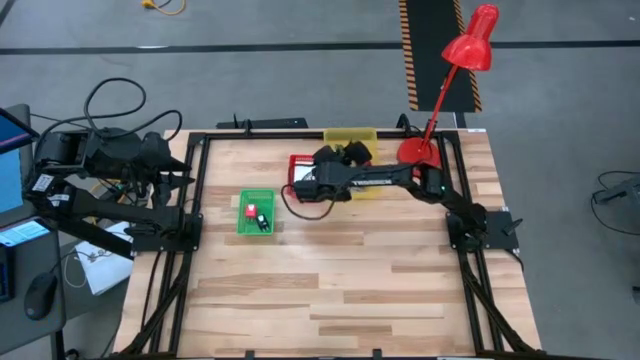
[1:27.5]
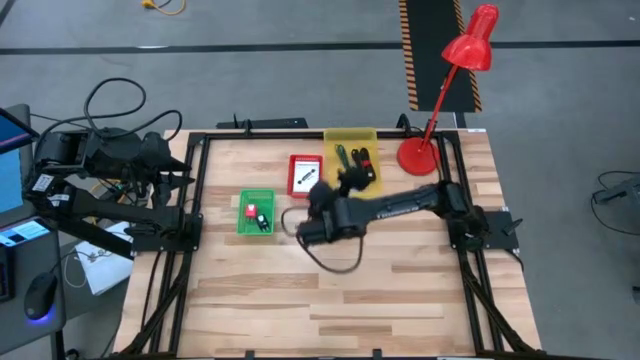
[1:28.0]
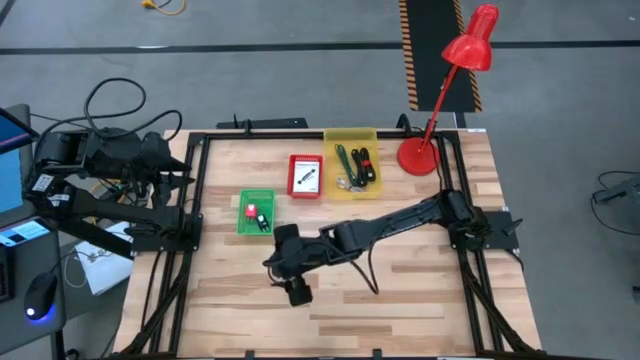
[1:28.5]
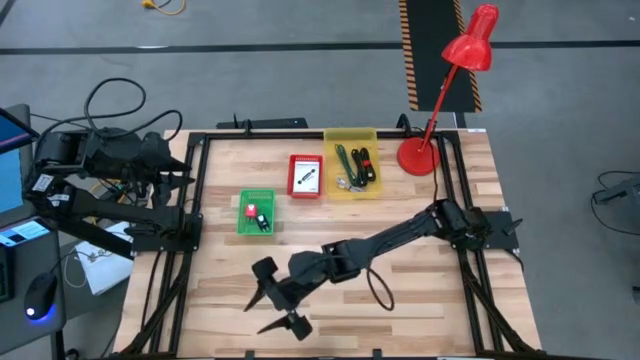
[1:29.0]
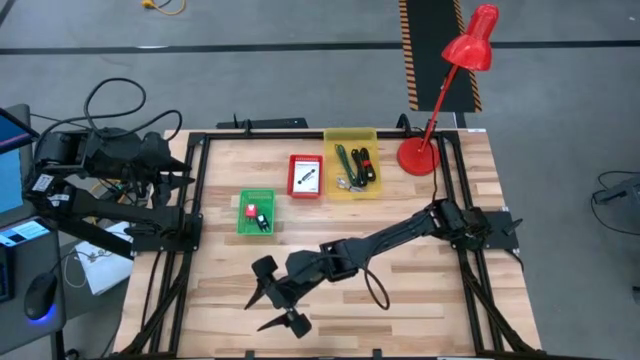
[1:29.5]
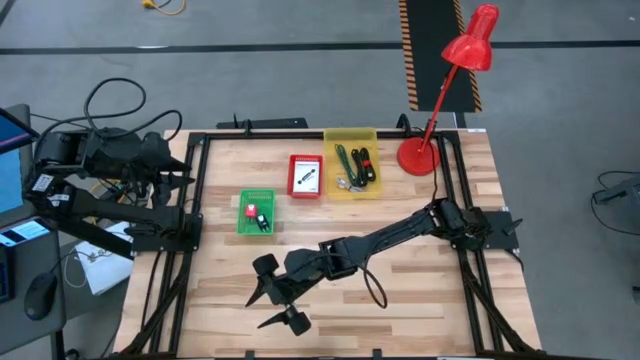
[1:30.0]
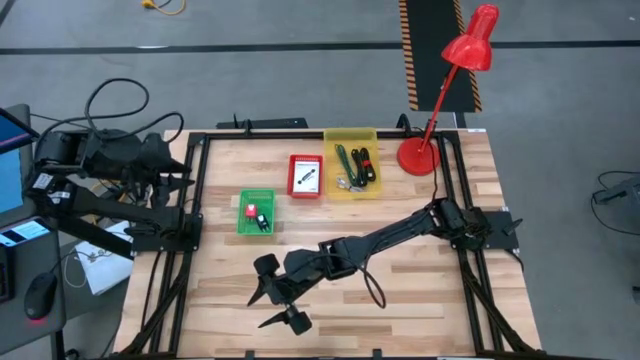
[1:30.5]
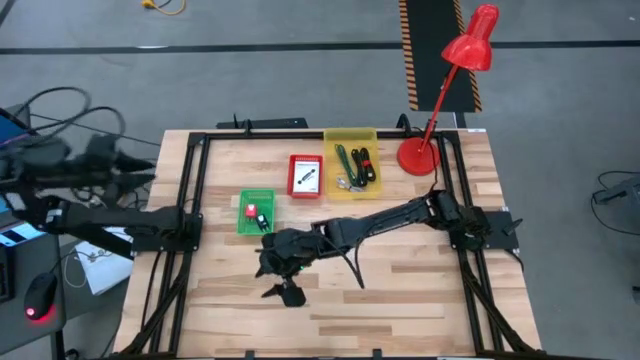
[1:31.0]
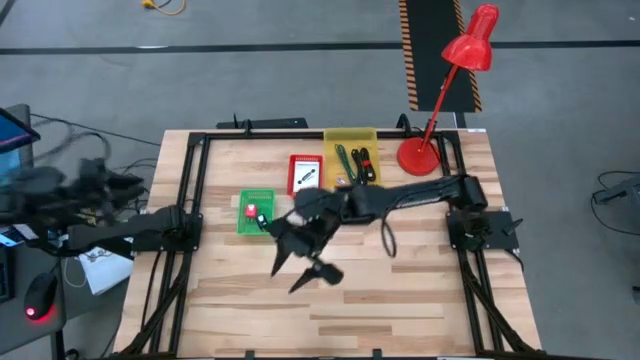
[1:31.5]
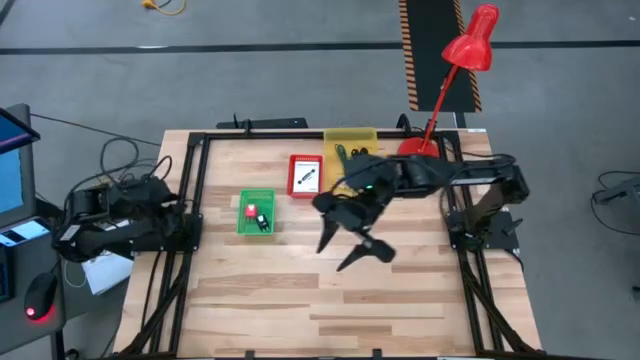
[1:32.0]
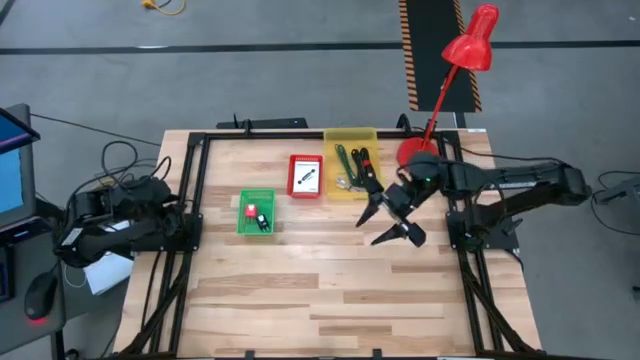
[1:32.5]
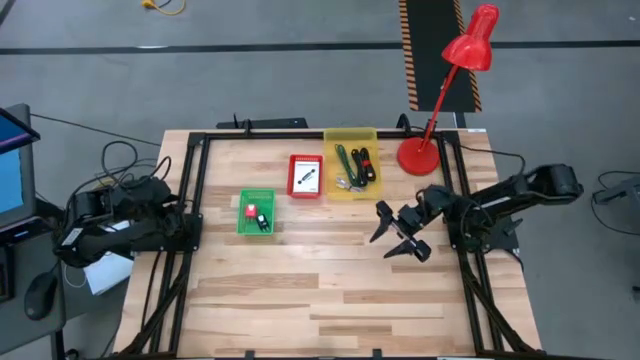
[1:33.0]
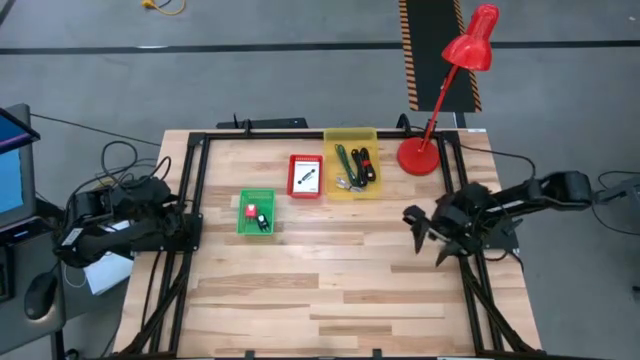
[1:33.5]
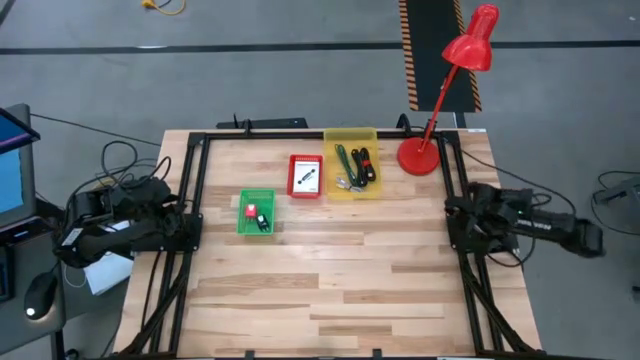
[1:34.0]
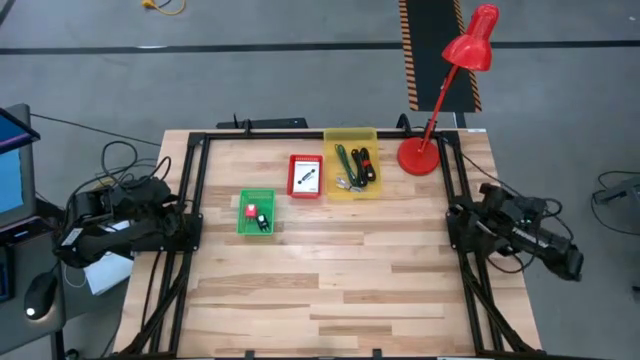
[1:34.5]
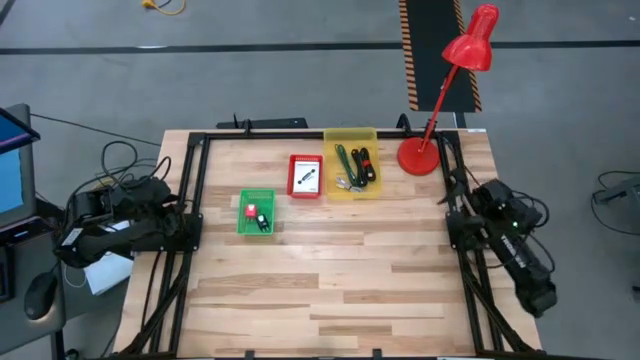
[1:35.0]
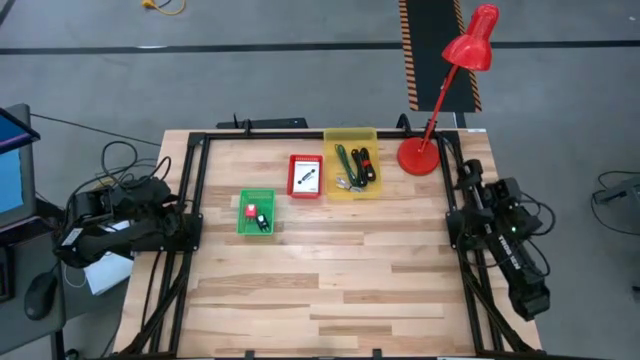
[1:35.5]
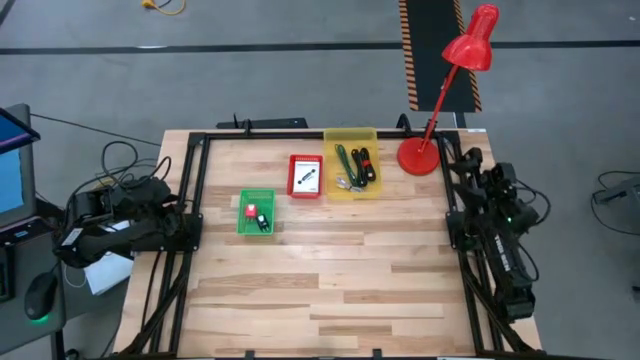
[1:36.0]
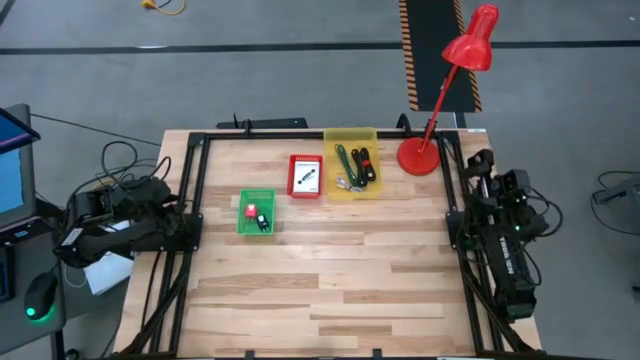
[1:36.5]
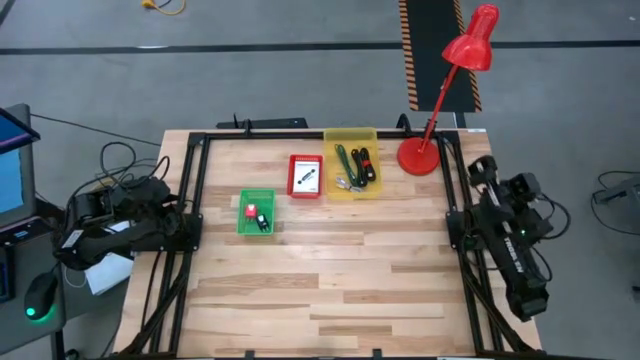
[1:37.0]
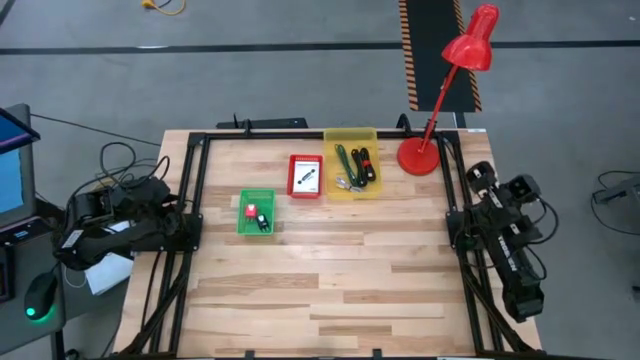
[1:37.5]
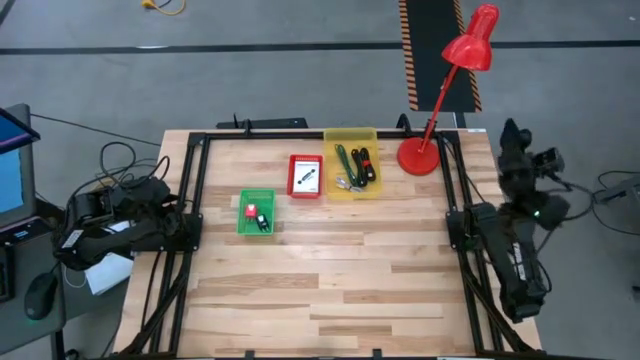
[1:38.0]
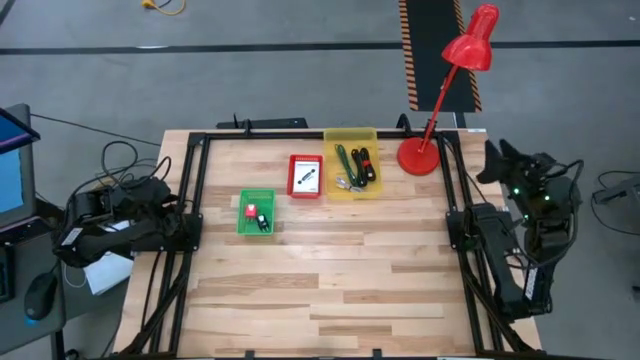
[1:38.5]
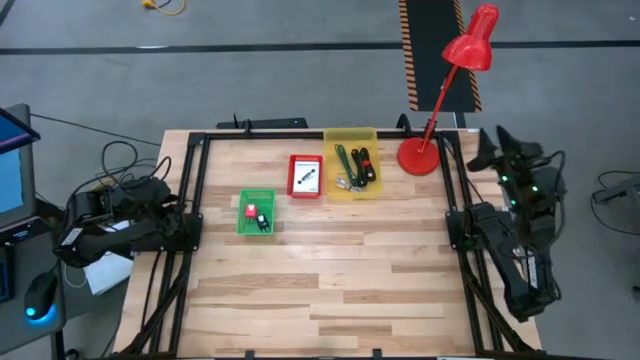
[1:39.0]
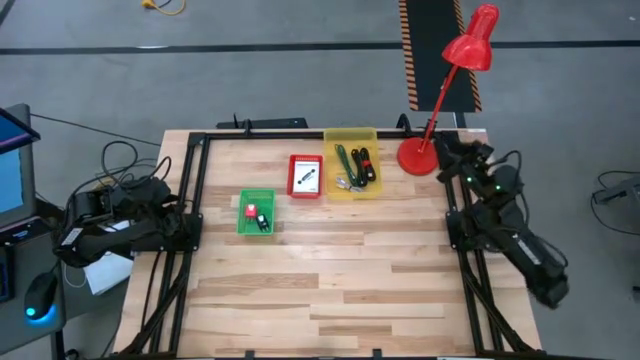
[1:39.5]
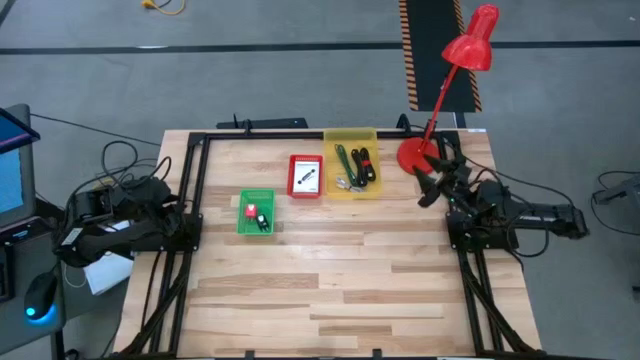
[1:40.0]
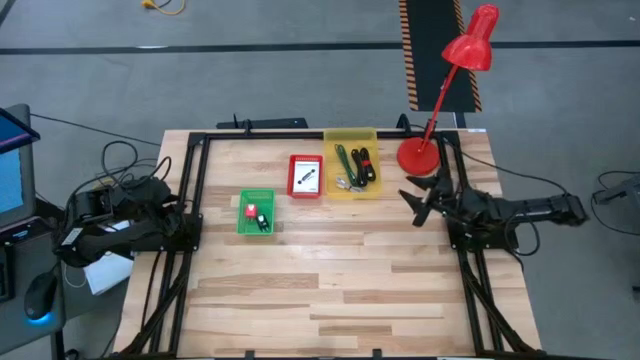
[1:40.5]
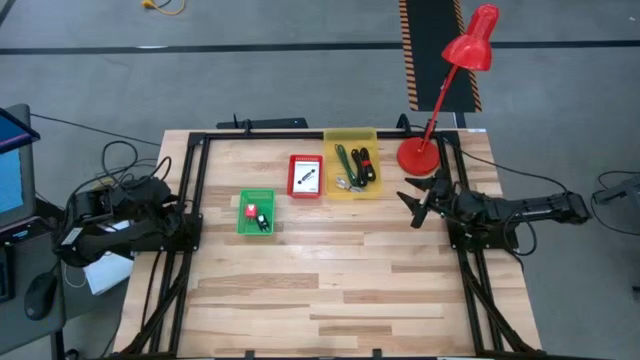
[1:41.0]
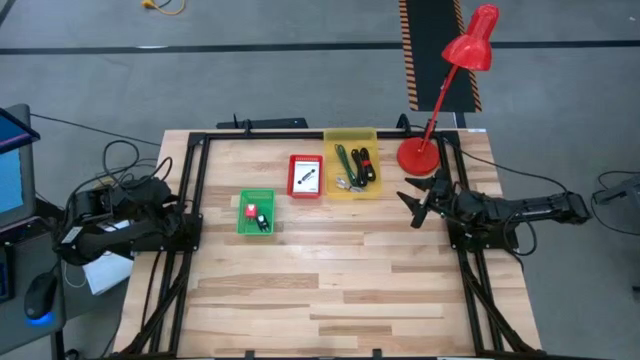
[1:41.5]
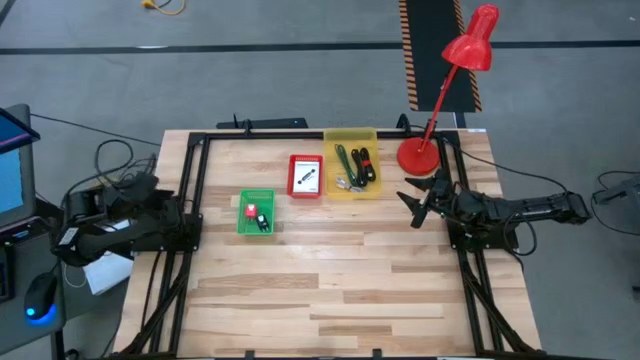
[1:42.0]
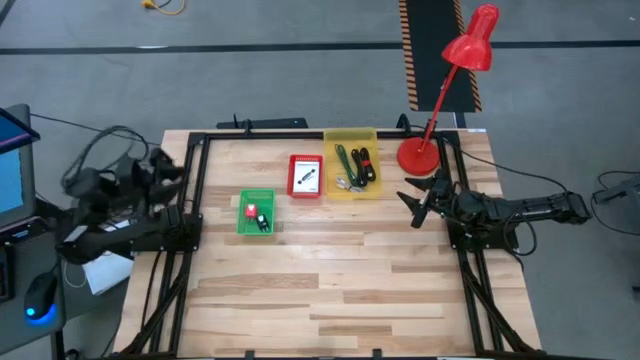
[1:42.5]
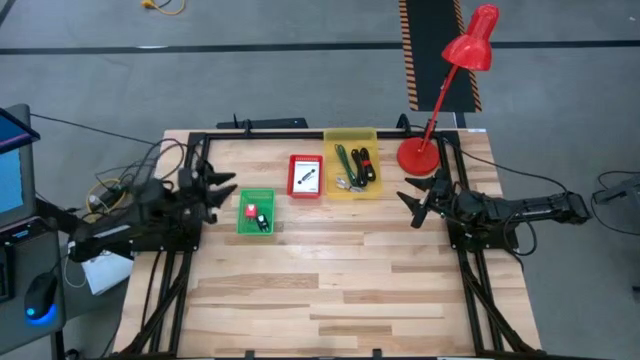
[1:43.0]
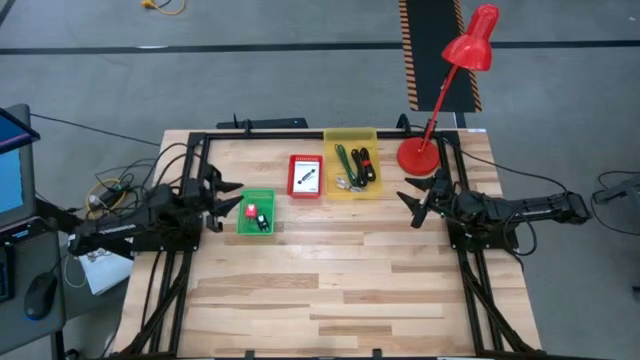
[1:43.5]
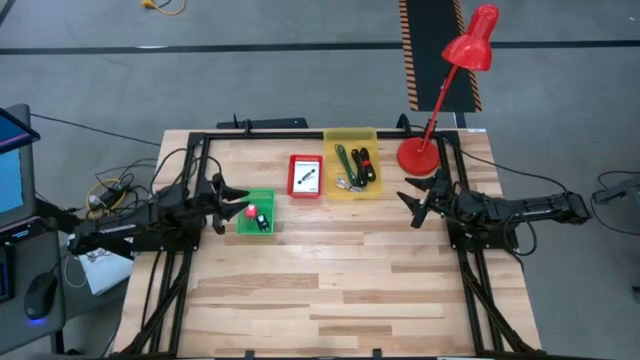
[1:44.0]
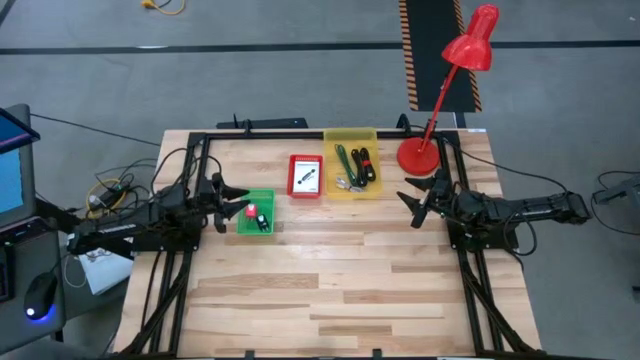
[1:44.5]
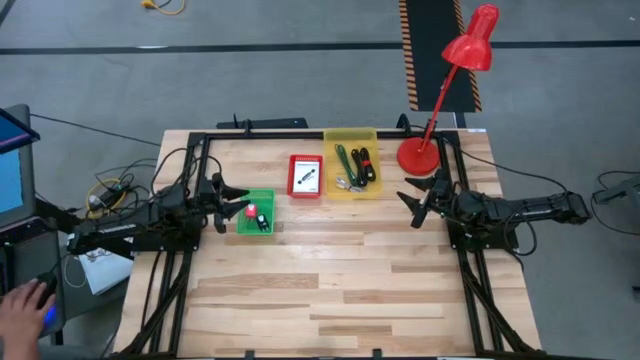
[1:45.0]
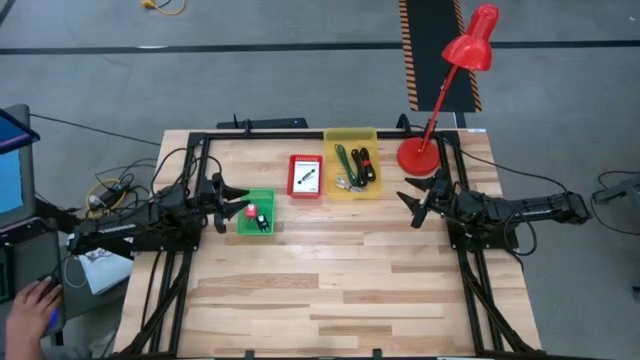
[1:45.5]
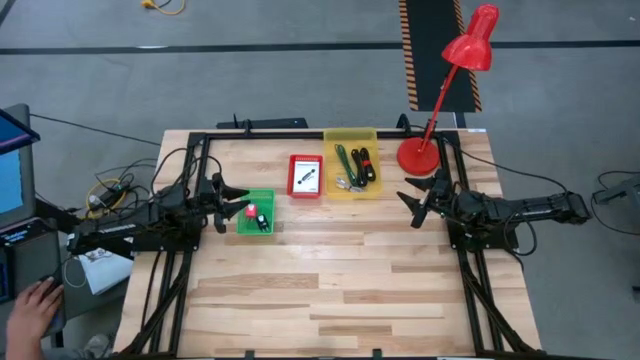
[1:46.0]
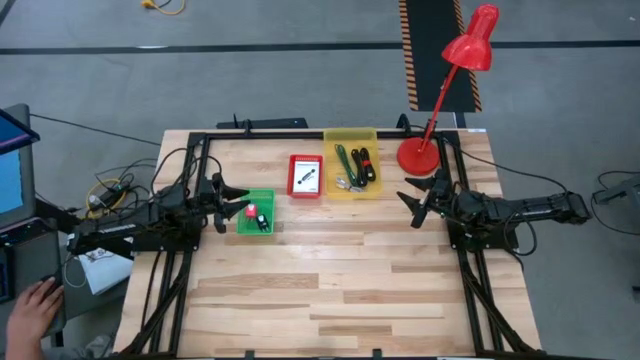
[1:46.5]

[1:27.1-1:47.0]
Task: Pick and place items into bin
Return to Home Position

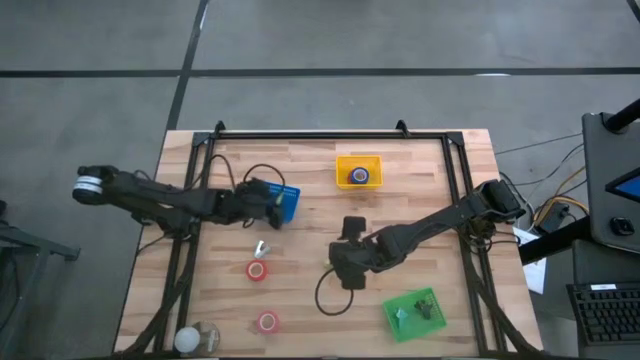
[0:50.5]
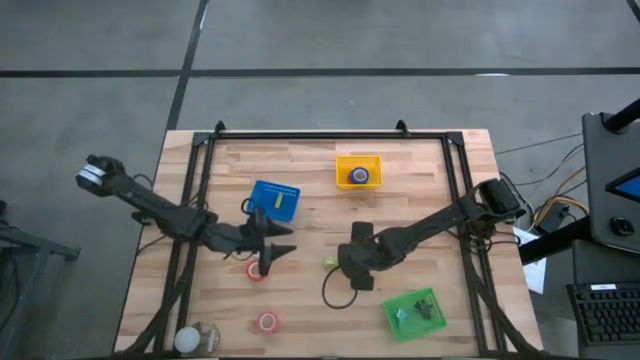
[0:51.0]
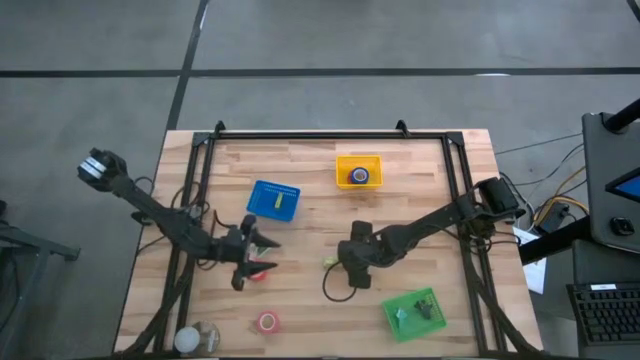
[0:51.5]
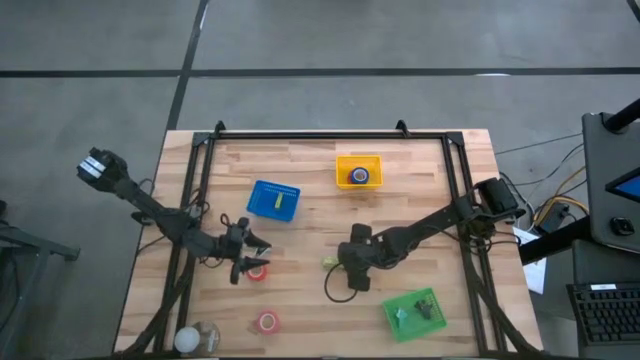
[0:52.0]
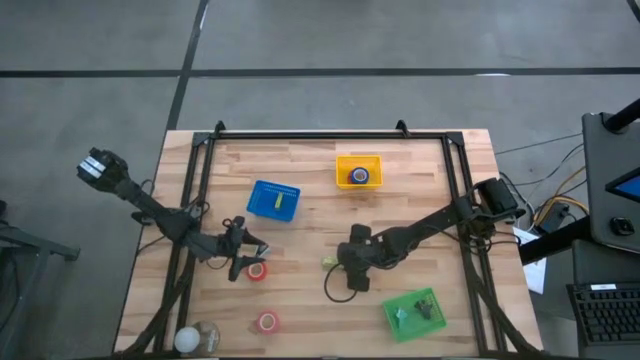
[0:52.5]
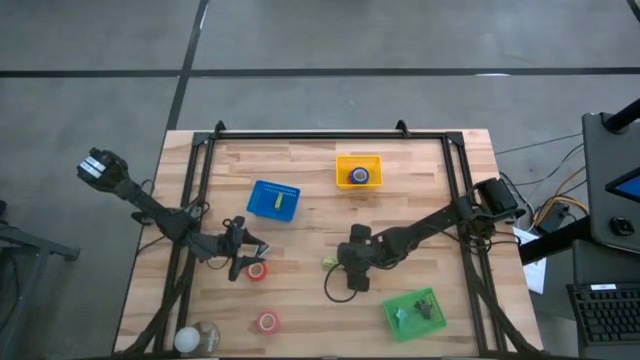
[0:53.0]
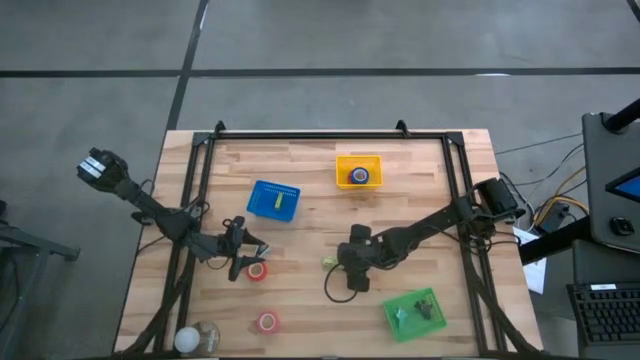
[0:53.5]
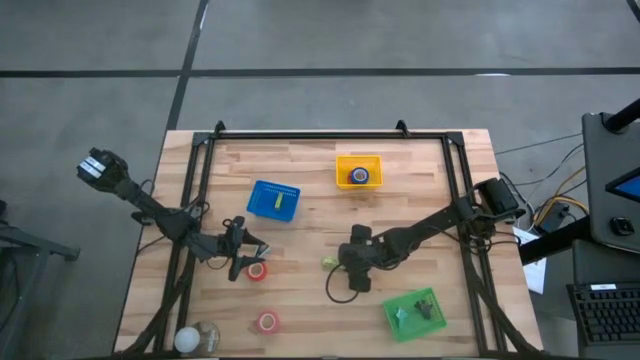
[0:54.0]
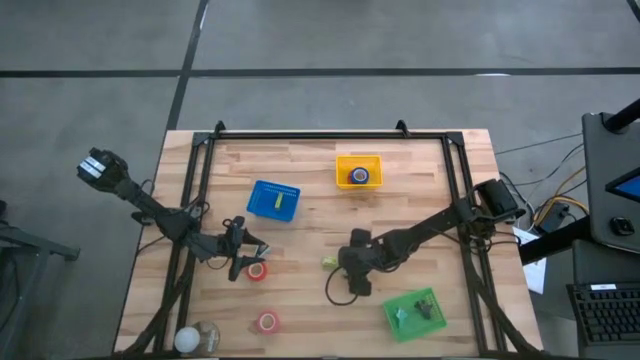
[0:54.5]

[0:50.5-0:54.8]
Task: Pick and place Stapler, Stapler remover, tape
Put the right green stapler pin box into the blue bin
